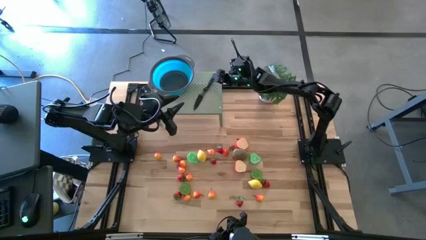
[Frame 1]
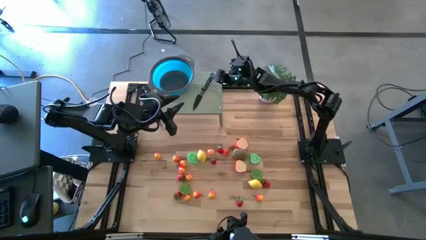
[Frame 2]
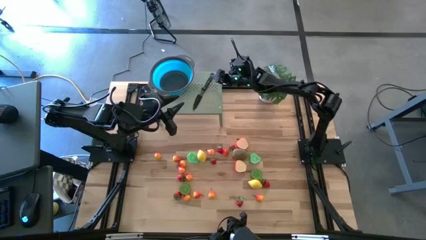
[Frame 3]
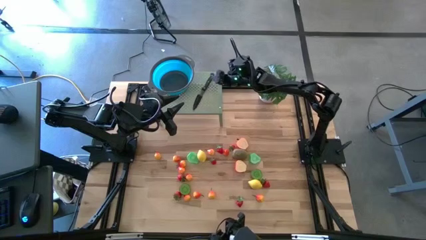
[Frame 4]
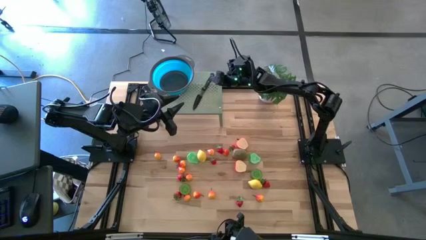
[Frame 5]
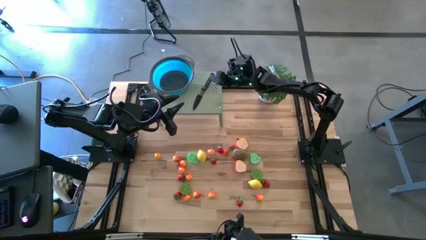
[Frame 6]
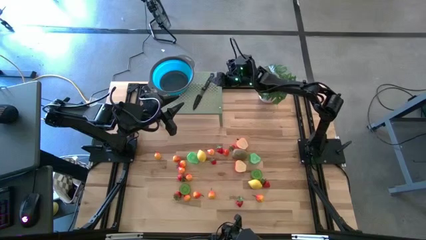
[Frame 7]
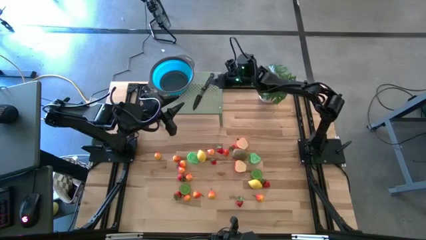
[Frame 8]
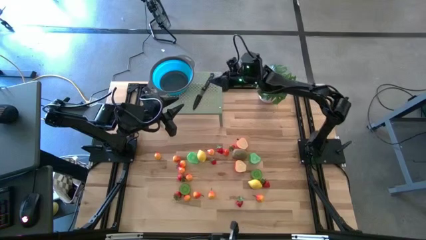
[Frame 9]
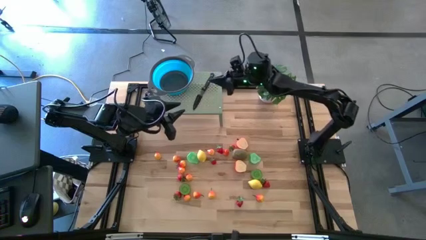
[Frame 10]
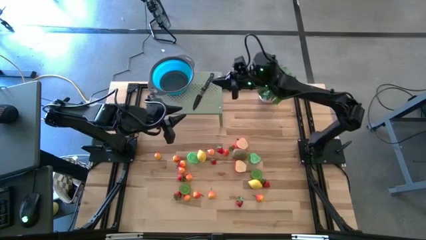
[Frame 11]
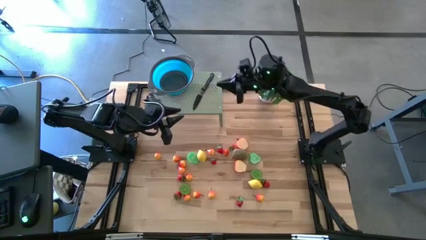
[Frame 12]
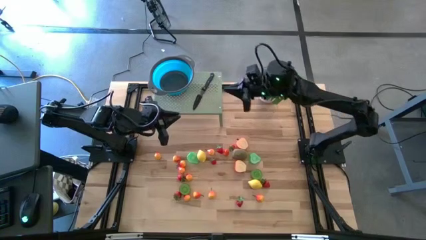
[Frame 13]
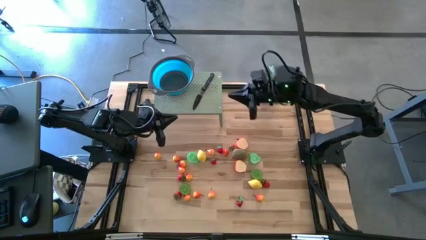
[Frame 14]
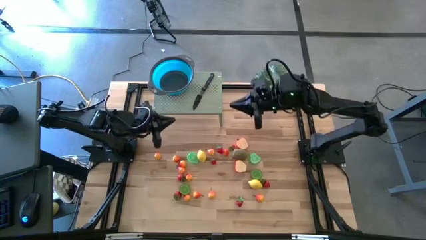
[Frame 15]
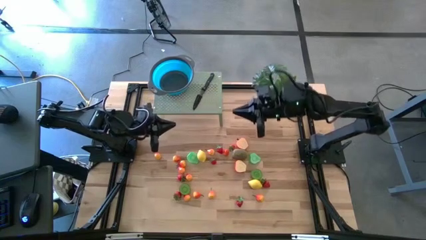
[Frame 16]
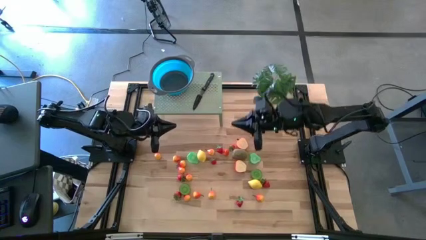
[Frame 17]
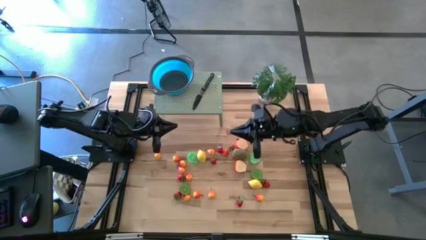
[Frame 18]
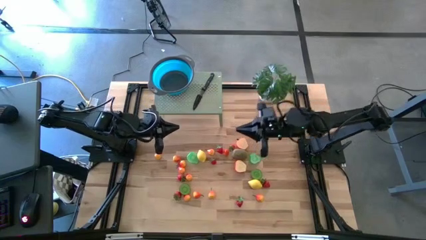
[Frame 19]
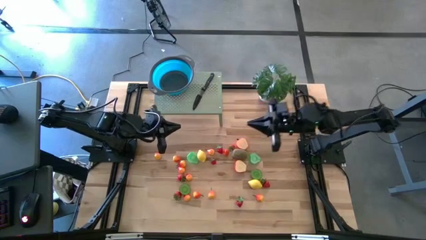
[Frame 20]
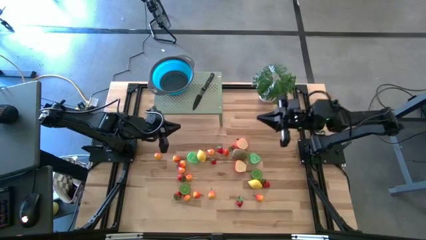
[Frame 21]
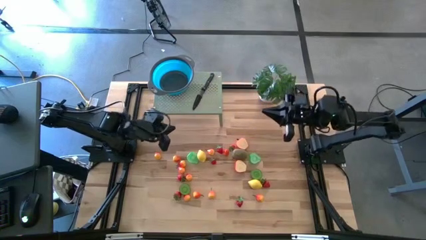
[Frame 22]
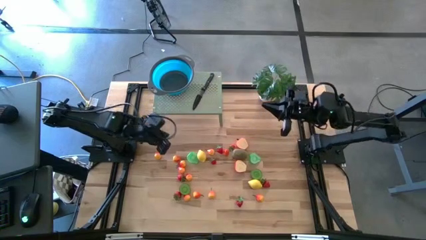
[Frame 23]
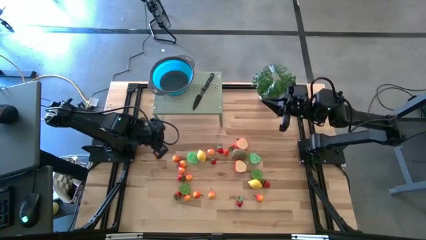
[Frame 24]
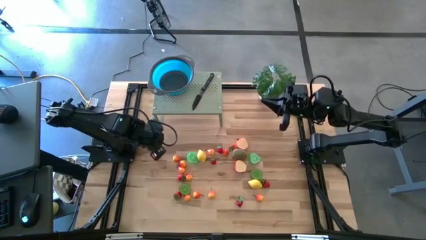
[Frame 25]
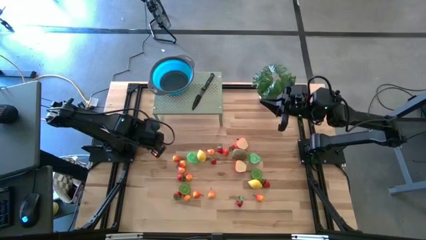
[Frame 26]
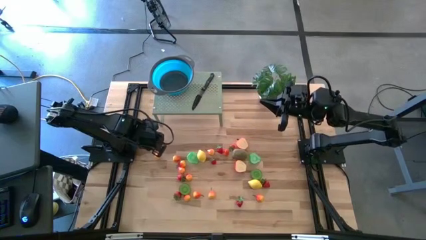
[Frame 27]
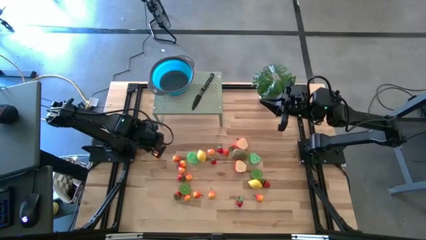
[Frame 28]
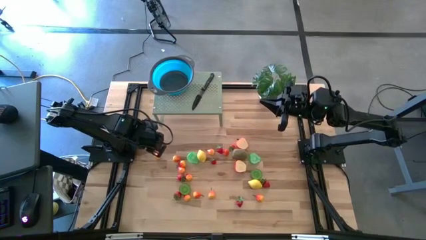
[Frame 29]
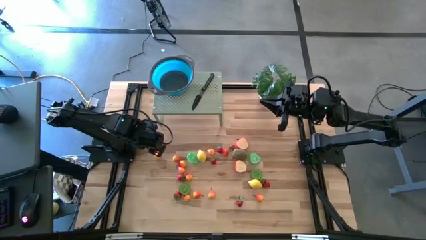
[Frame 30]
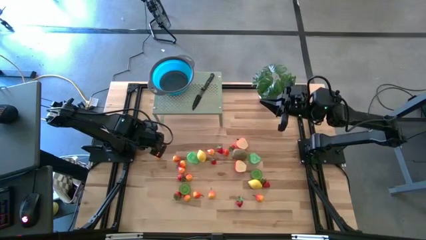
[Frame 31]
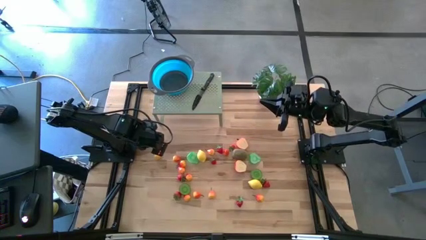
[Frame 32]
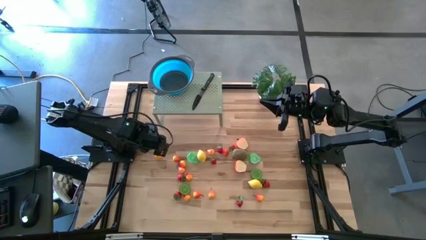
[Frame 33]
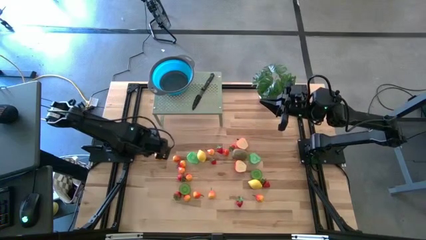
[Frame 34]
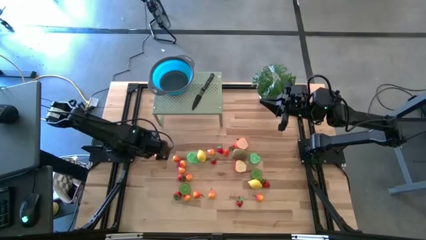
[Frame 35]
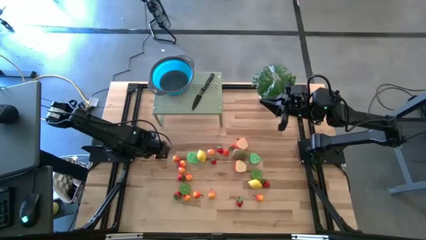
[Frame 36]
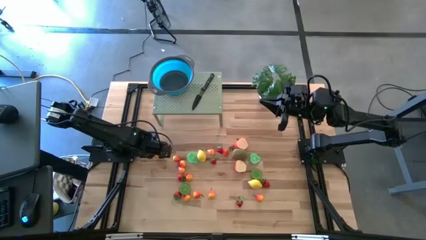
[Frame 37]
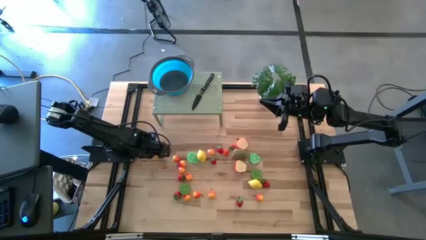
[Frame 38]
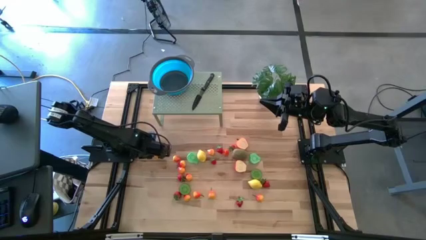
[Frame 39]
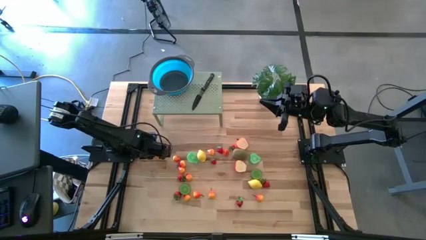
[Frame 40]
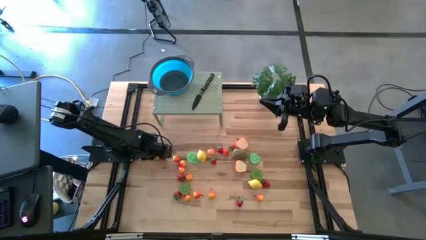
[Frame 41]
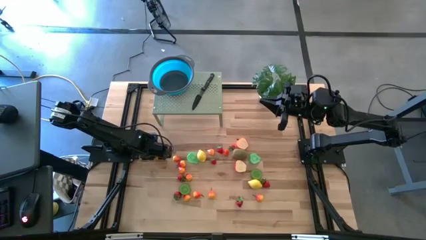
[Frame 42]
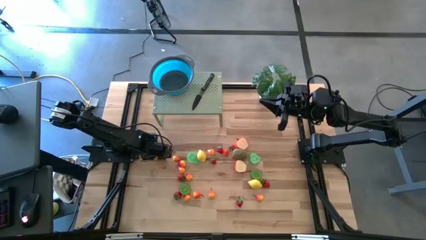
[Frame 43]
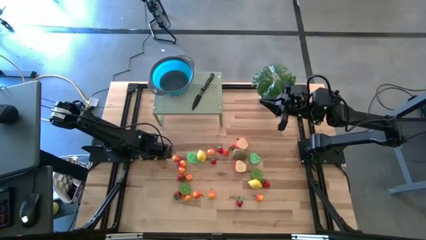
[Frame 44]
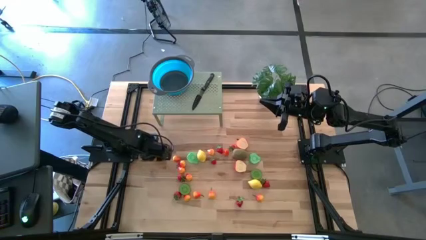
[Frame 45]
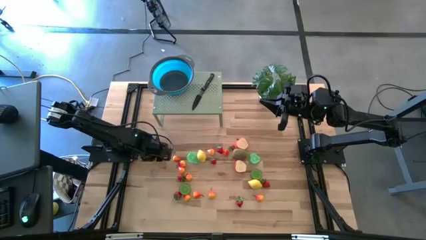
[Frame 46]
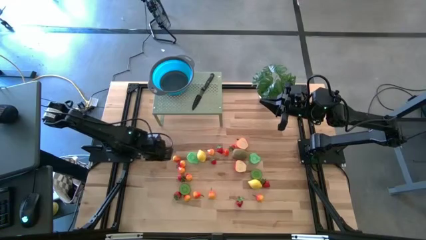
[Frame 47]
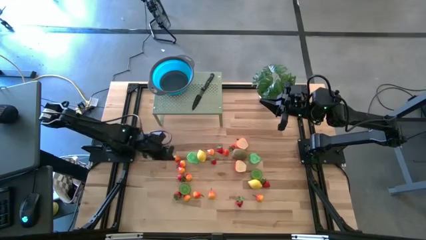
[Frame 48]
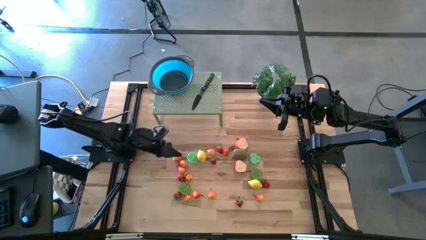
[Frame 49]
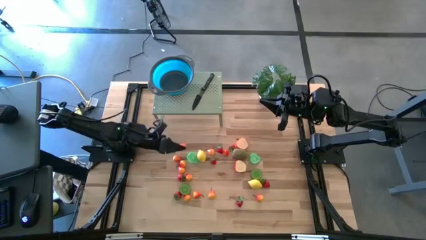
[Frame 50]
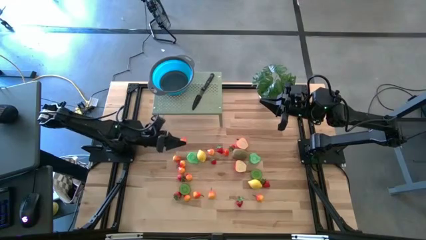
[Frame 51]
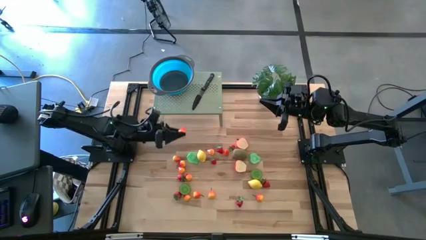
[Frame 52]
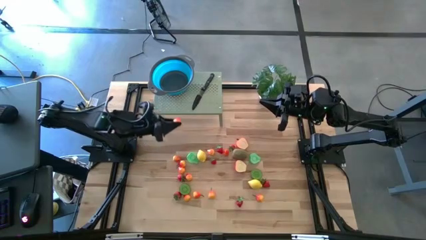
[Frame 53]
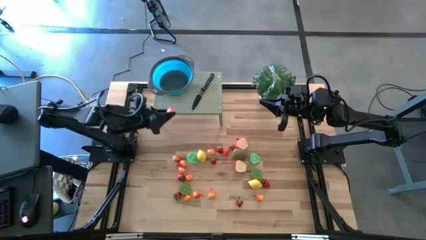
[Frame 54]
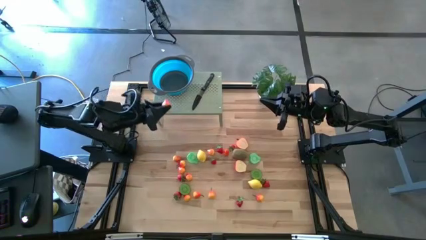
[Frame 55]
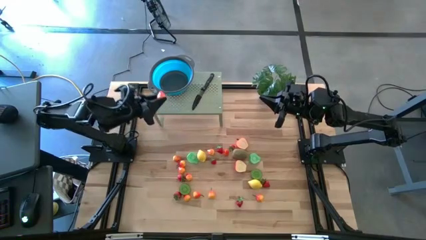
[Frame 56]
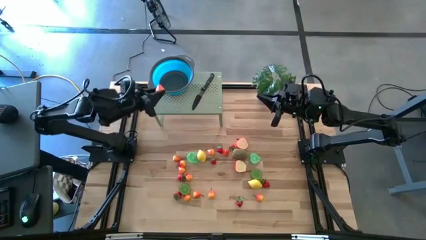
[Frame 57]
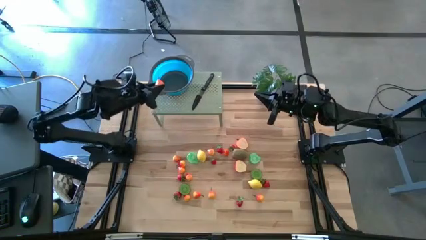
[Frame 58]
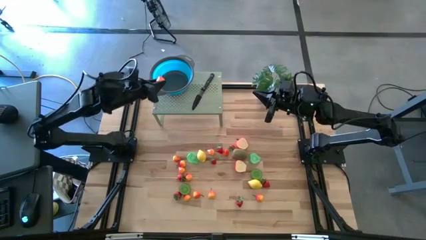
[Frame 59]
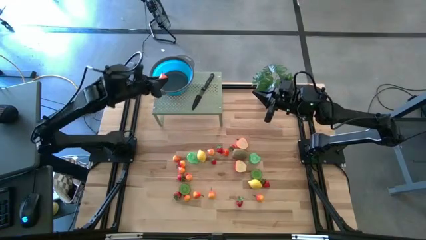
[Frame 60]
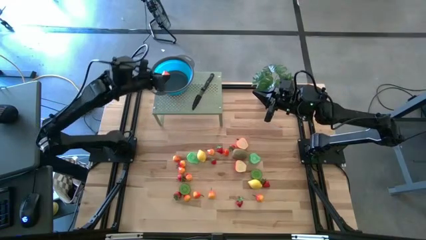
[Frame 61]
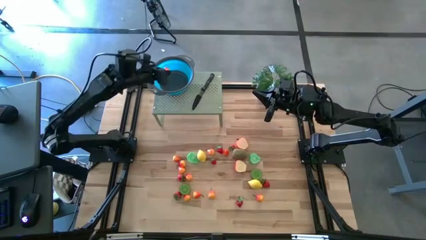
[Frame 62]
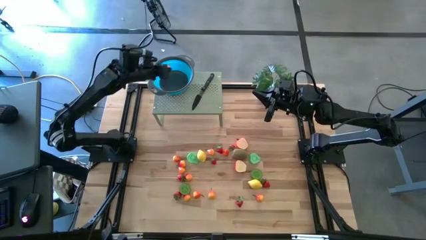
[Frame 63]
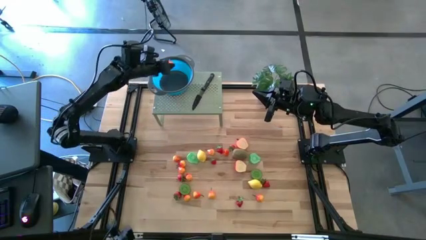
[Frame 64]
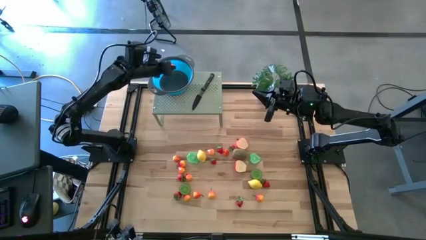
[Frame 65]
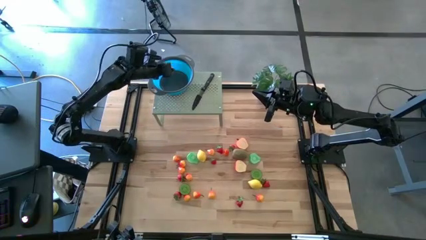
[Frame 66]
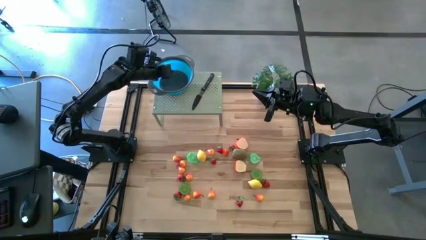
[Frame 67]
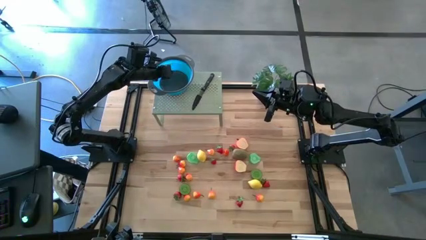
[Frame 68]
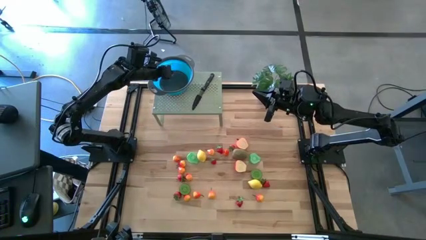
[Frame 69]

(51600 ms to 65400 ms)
Task: Pick & Place Fruit
Put the orange pear into the strainer bowl on the shelf

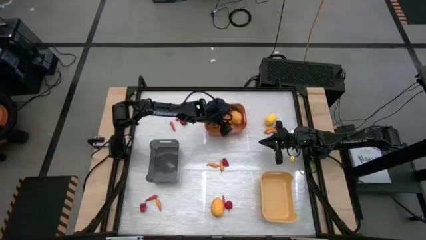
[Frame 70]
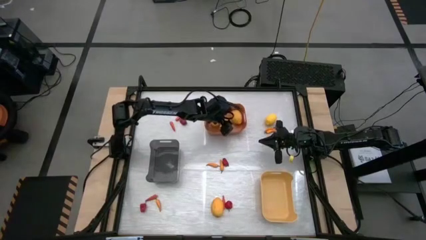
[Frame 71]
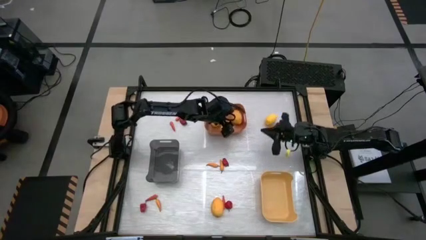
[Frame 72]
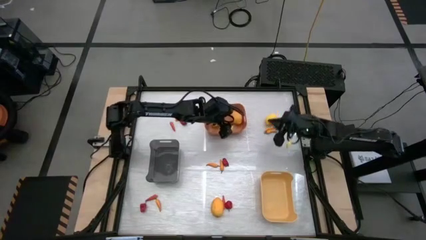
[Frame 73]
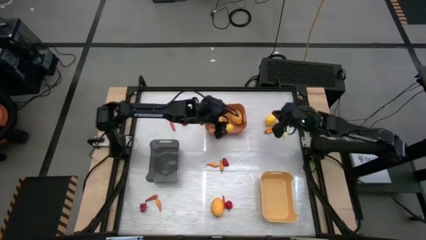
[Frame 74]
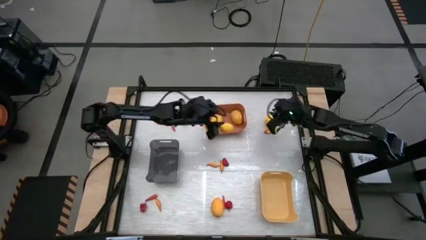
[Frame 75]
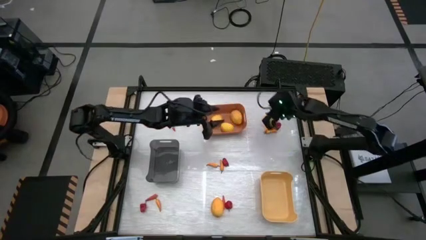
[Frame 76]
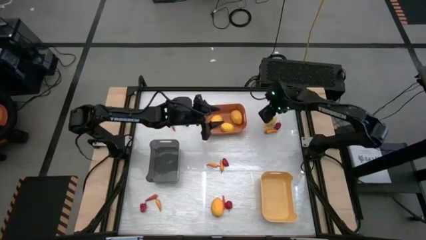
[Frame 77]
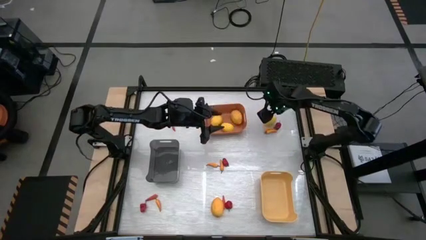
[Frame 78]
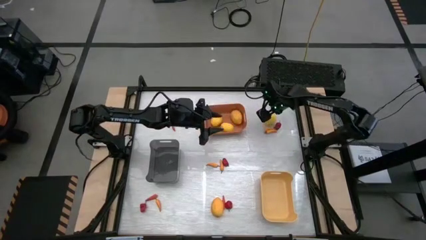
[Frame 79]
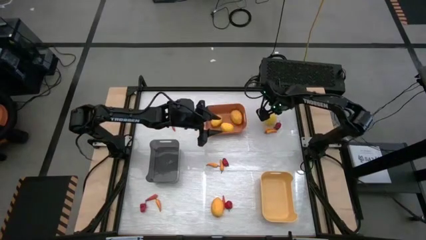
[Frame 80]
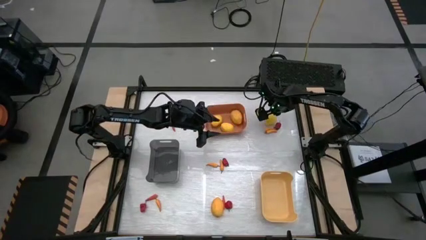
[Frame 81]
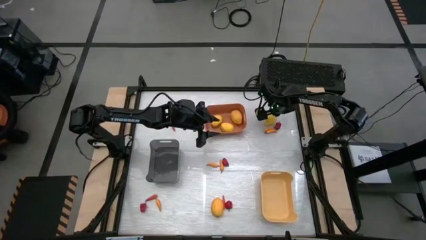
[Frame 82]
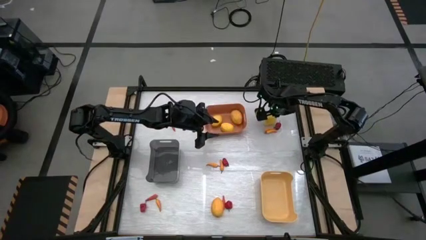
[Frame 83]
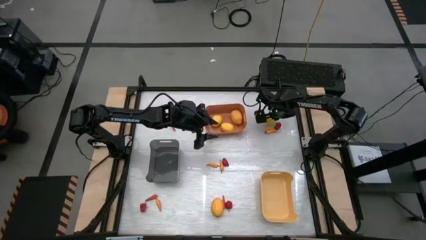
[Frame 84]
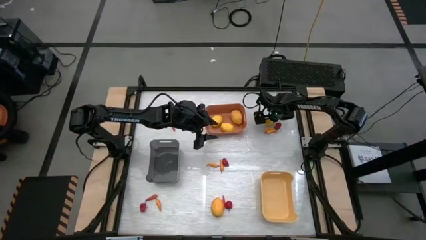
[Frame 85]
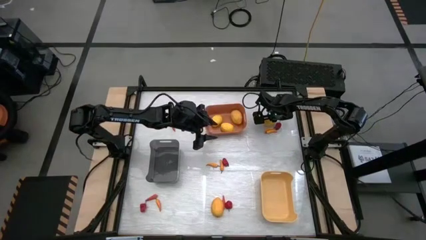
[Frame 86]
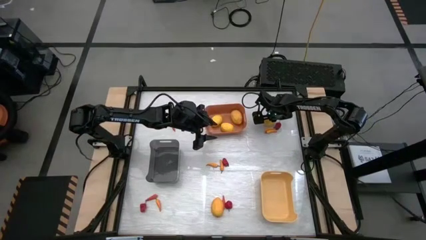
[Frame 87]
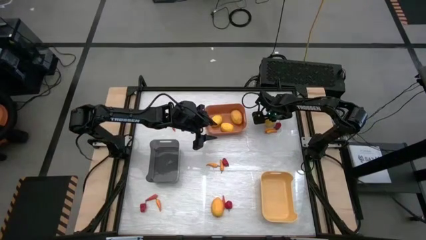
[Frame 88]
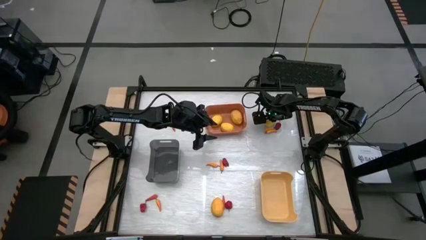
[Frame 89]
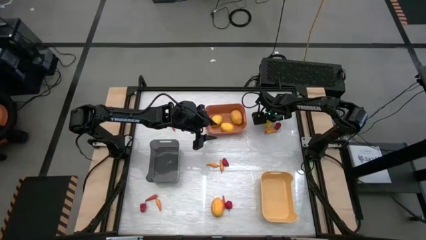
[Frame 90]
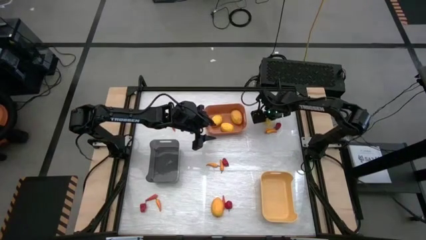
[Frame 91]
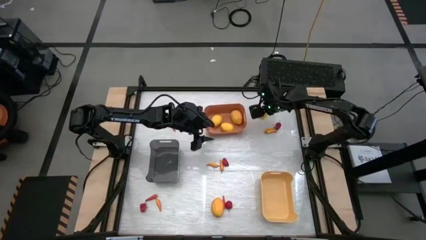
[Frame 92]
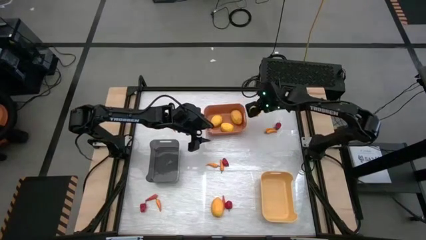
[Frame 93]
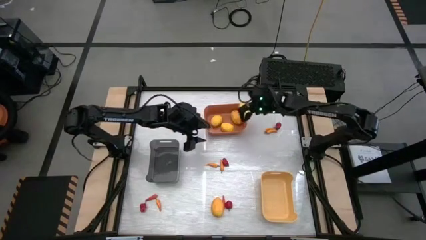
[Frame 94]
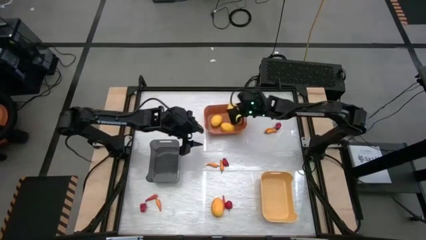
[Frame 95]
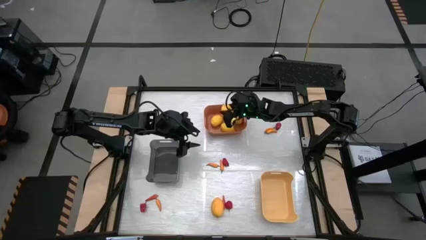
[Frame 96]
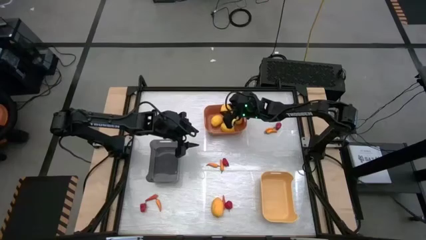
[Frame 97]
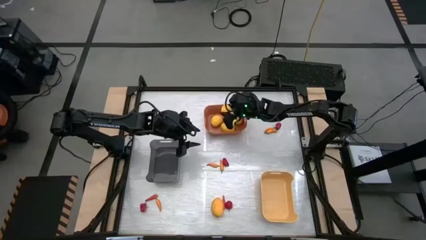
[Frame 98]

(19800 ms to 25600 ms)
Task: Sort produce into baskets
Put the lemon into the orange bin
